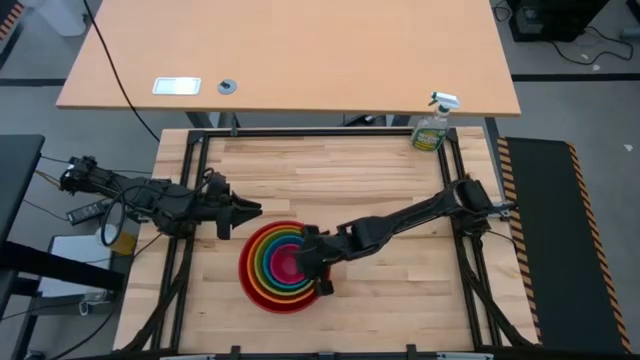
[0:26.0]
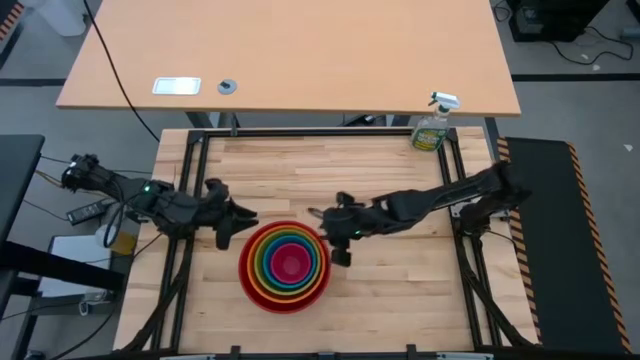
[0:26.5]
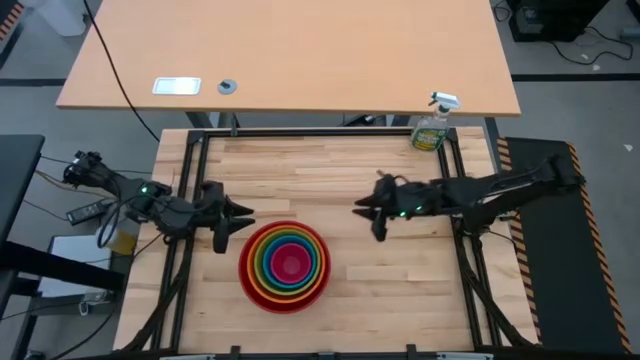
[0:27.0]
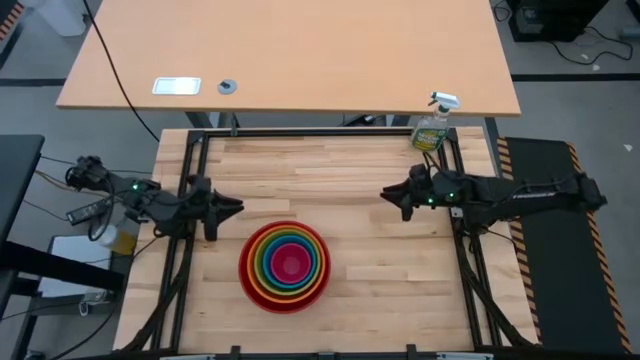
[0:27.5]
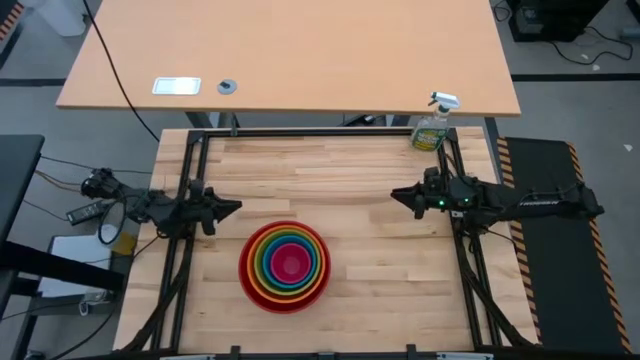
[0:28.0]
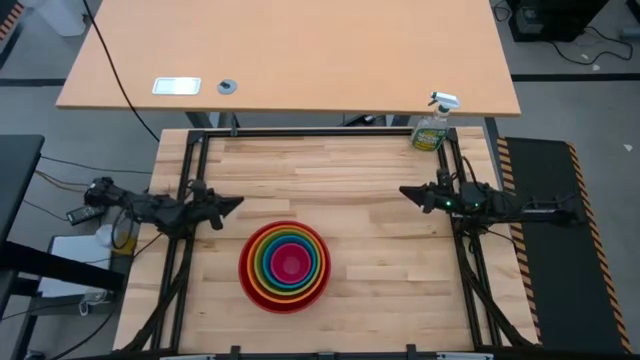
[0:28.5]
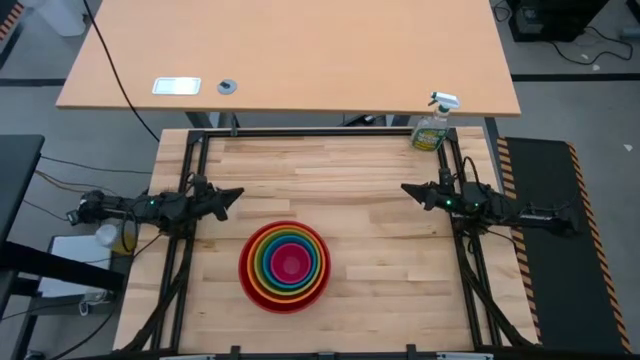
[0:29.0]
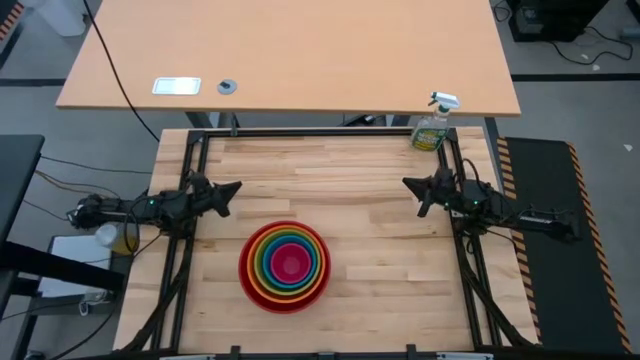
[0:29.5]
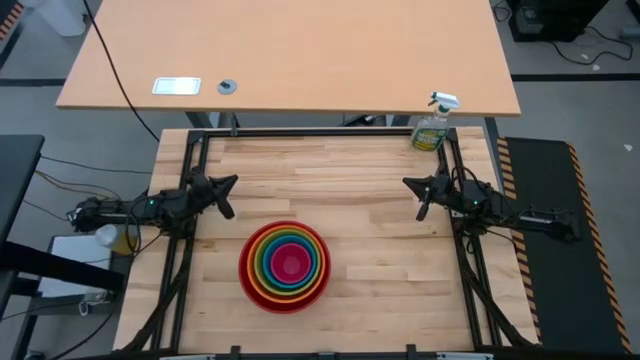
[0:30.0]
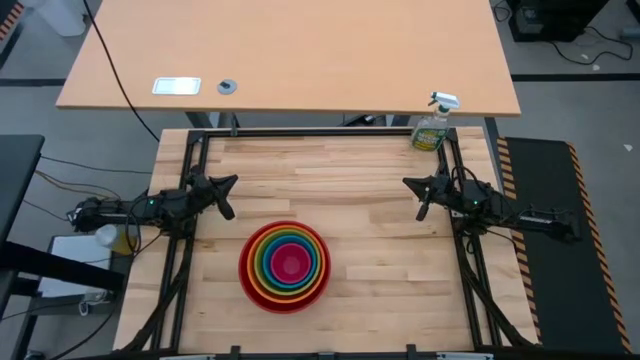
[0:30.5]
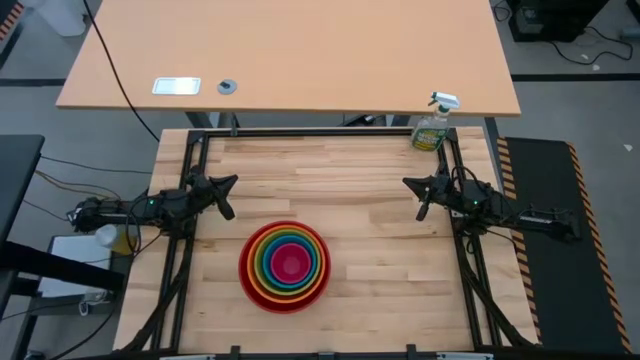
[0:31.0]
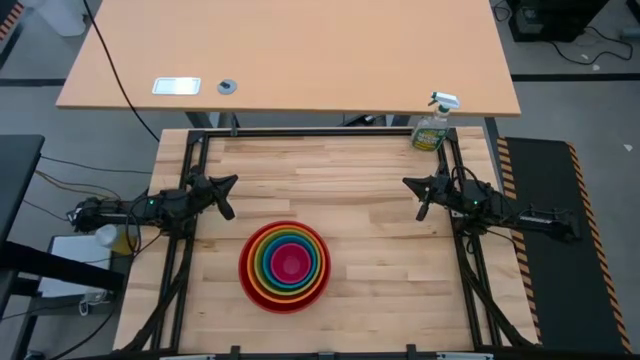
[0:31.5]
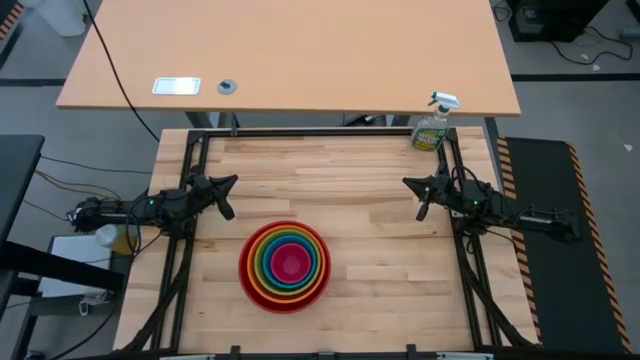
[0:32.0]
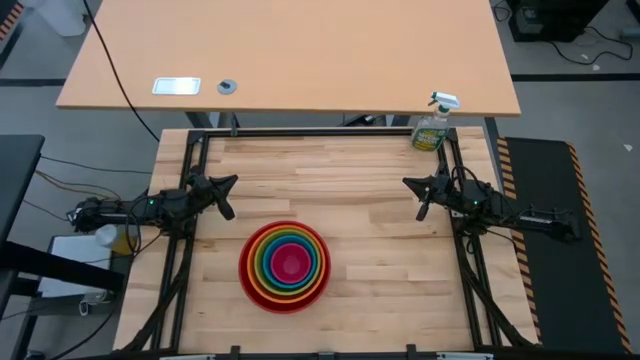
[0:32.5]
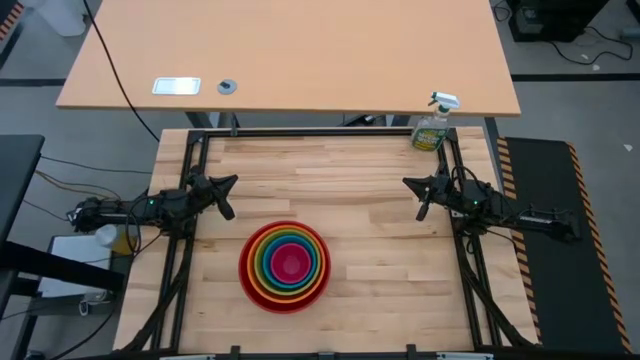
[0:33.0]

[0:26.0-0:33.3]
Return to Home Position

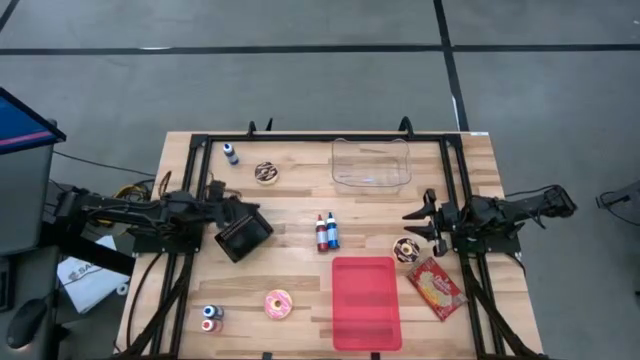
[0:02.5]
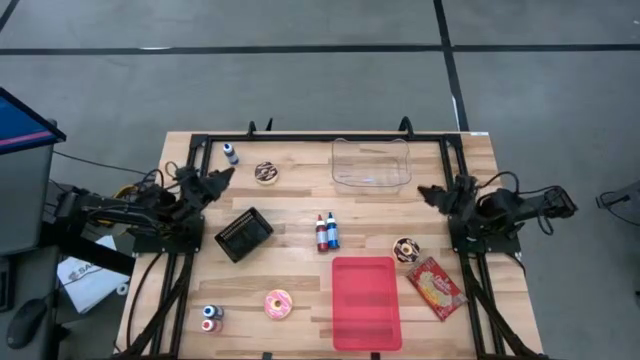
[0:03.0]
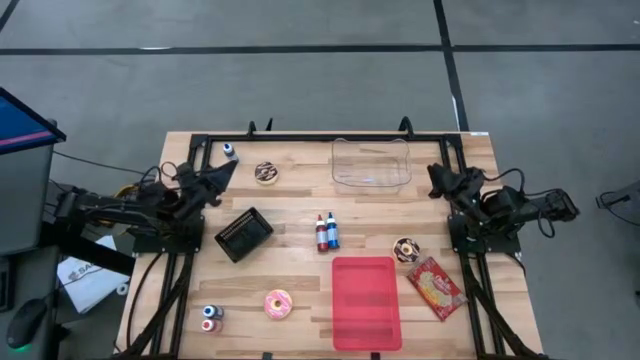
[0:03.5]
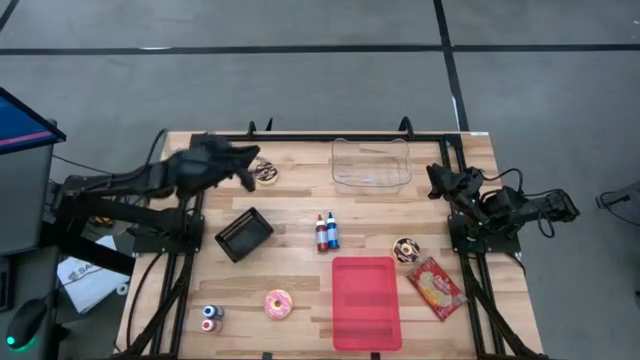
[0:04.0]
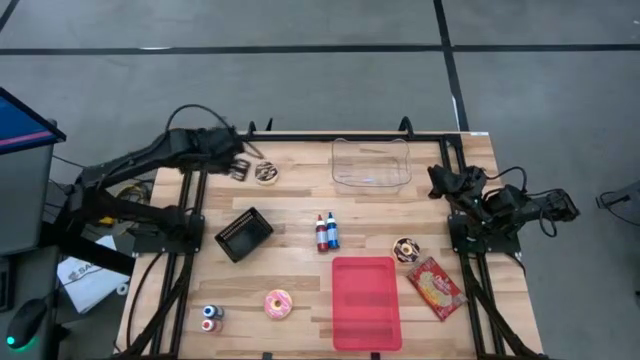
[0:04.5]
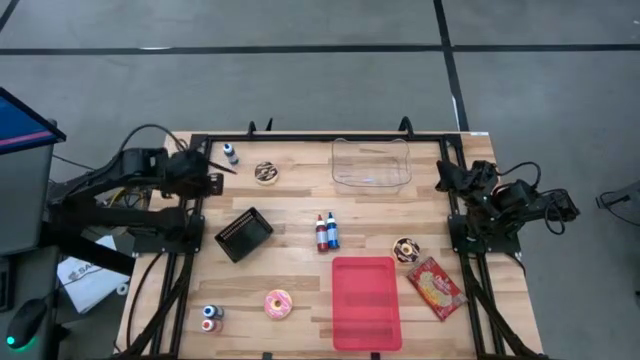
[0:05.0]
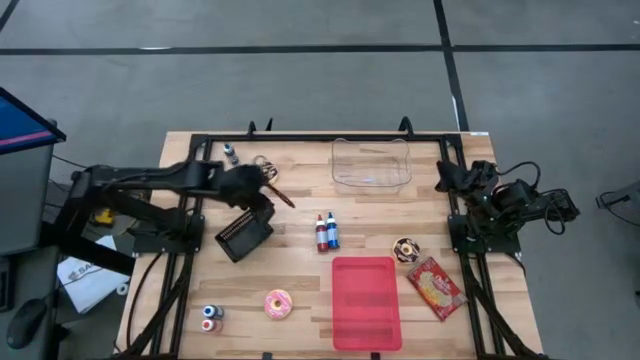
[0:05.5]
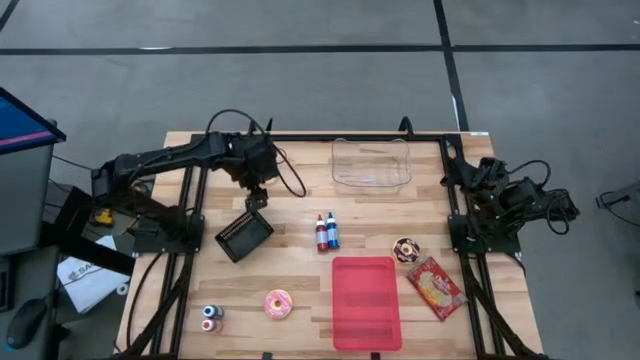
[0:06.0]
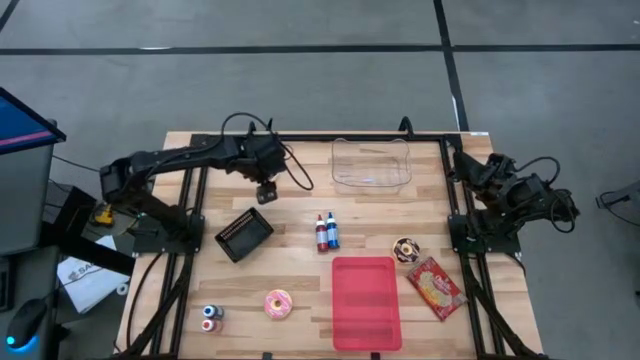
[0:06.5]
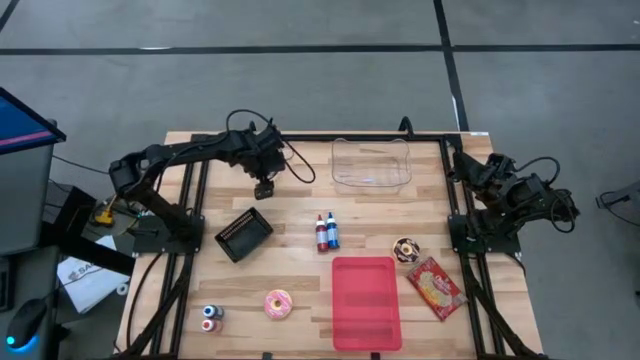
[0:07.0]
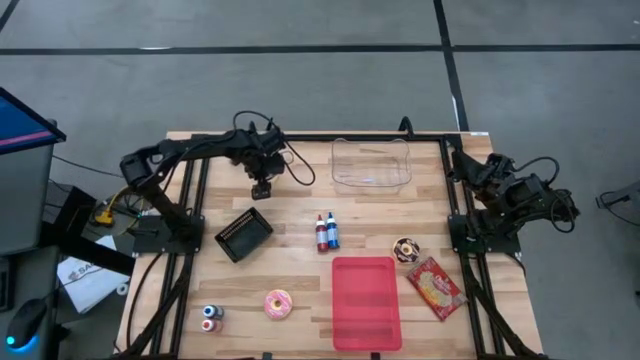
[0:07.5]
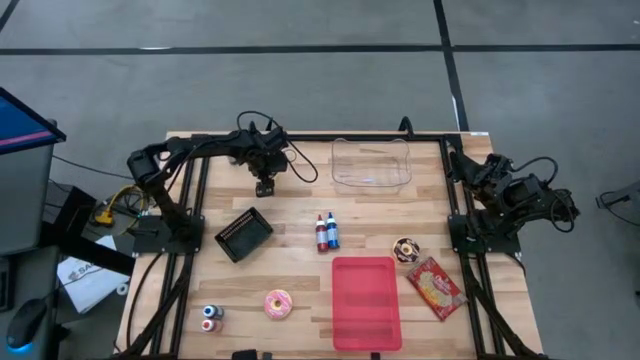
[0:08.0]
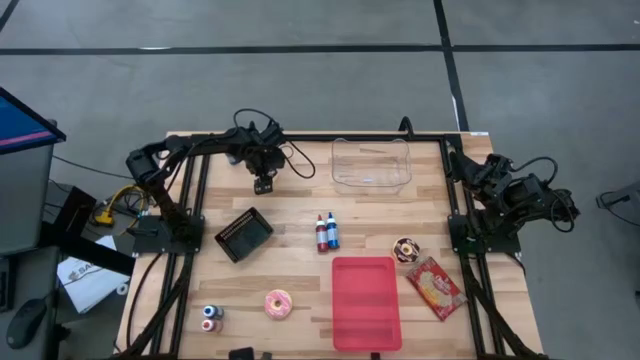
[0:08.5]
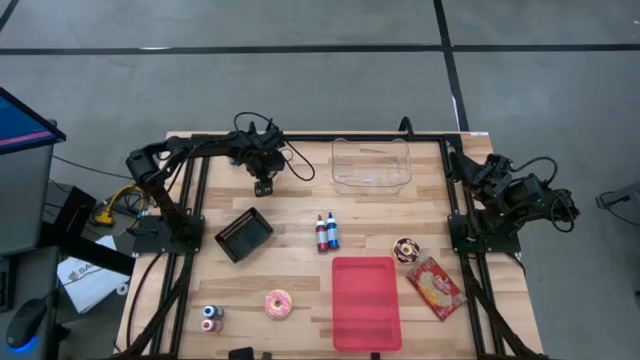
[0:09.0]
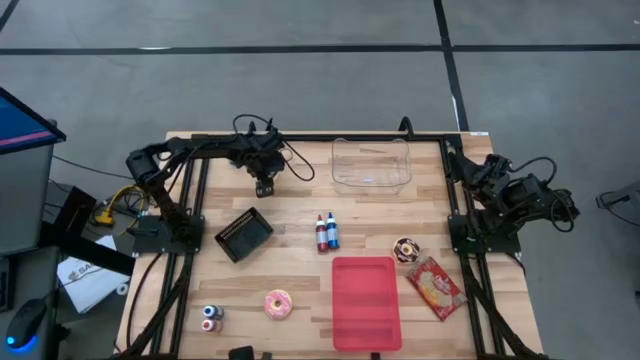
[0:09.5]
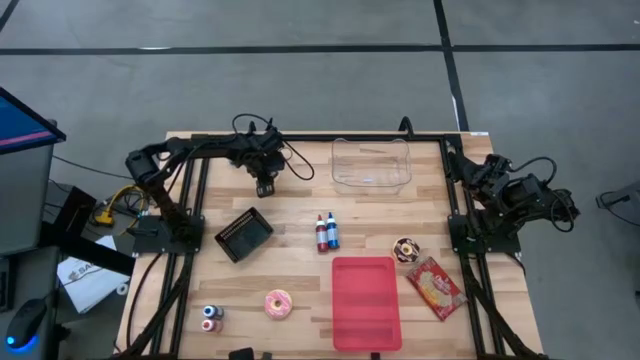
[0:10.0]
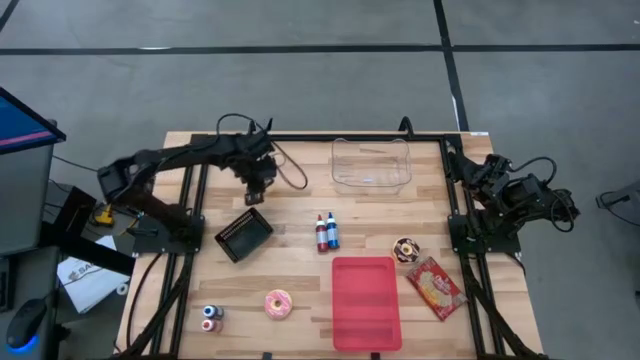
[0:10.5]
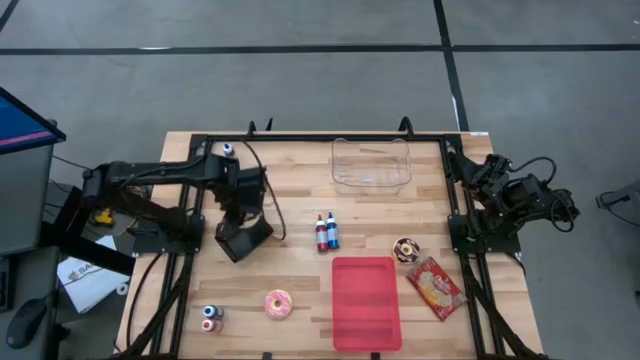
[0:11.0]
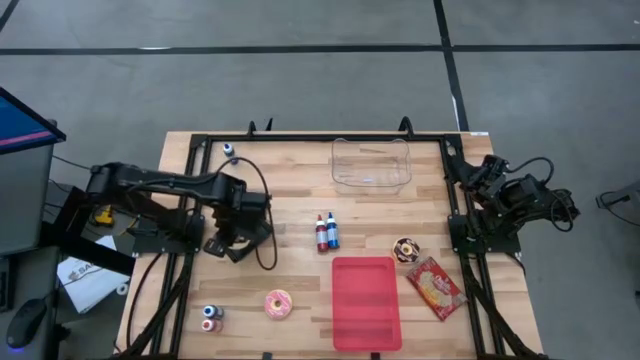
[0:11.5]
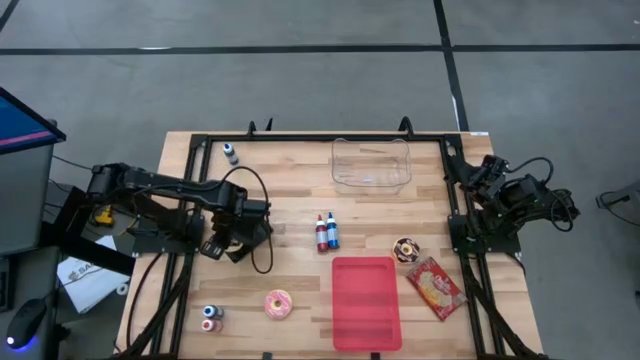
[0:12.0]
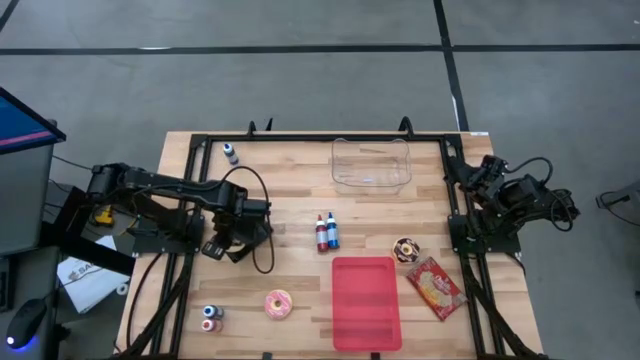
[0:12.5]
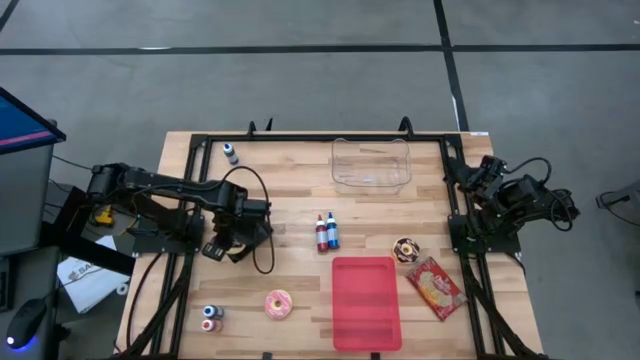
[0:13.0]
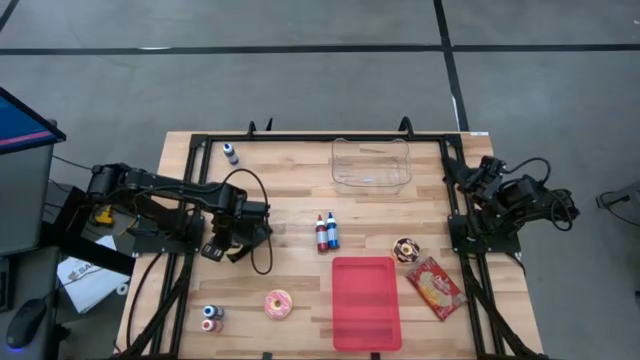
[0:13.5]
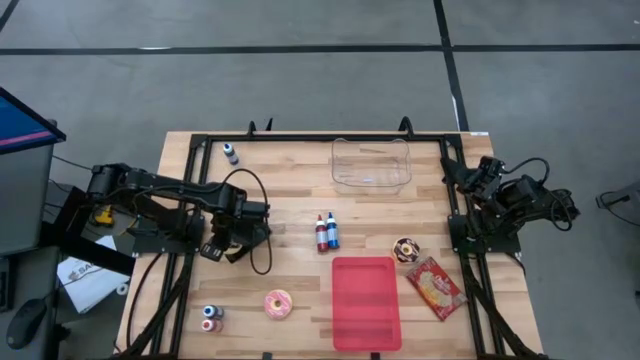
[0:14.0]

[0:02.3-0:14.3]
Put the top black donut into the black bin
